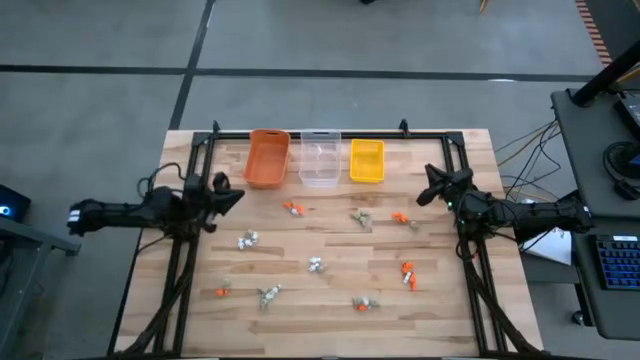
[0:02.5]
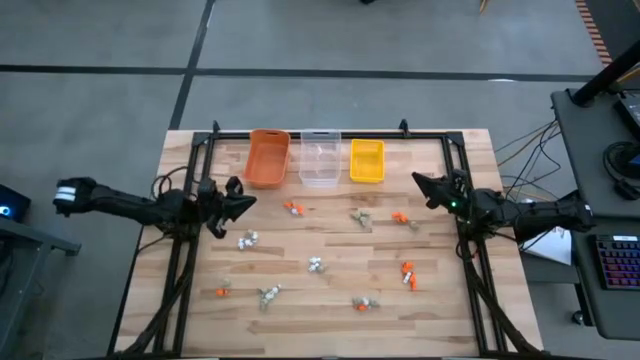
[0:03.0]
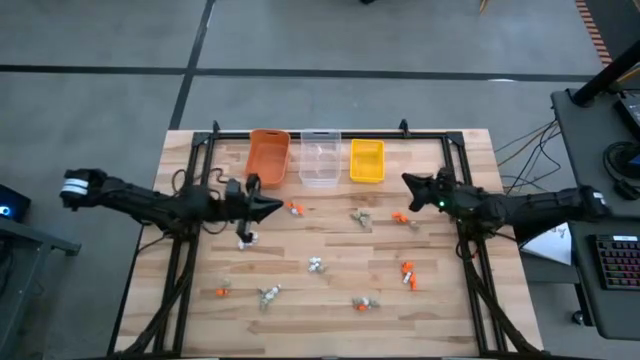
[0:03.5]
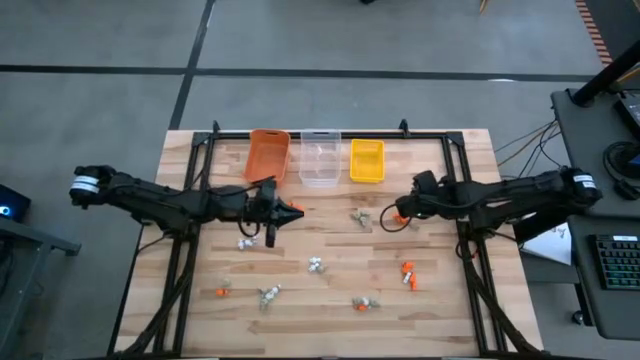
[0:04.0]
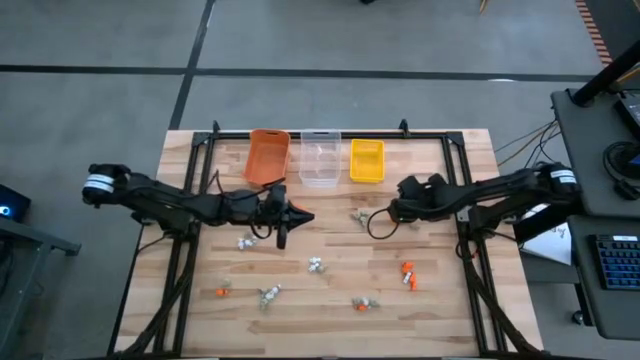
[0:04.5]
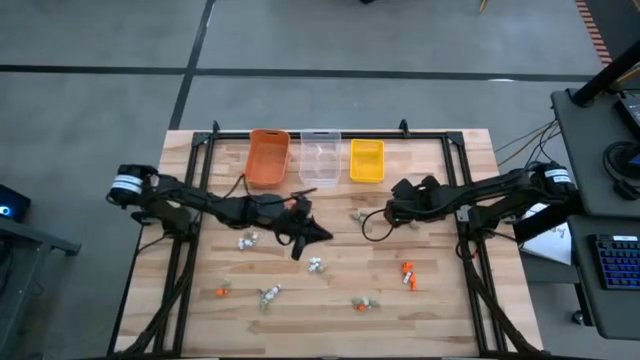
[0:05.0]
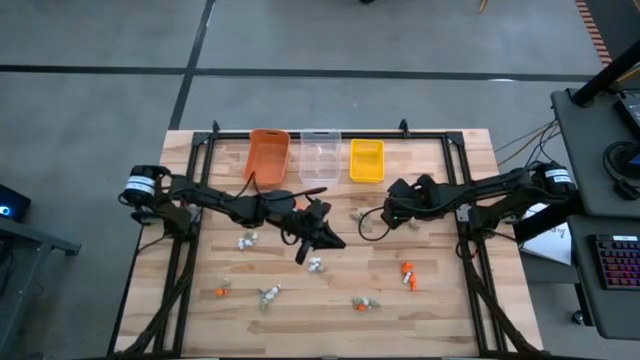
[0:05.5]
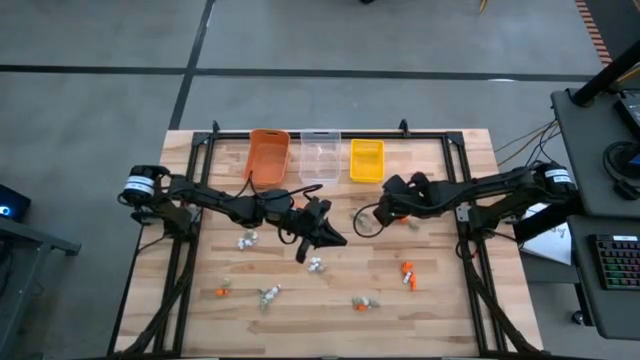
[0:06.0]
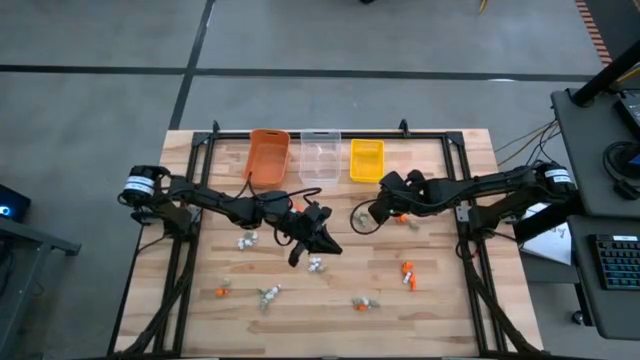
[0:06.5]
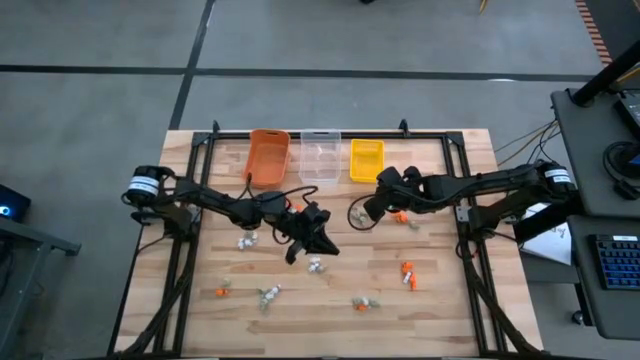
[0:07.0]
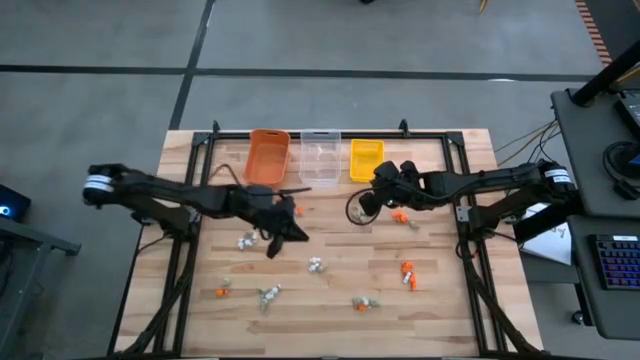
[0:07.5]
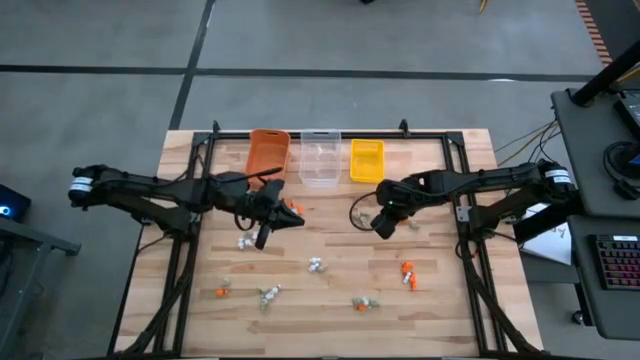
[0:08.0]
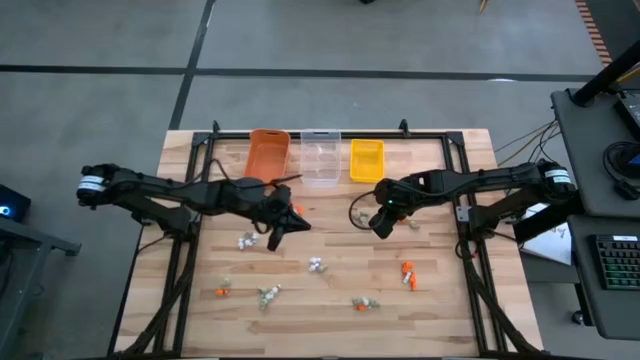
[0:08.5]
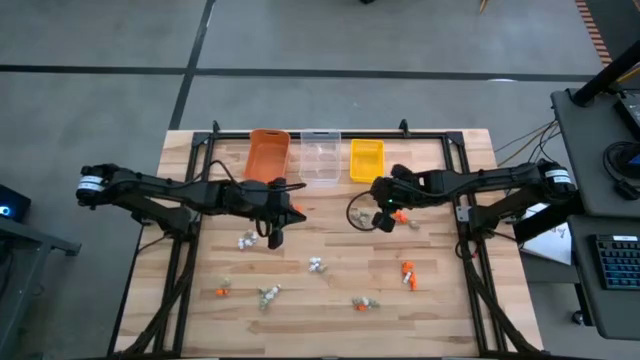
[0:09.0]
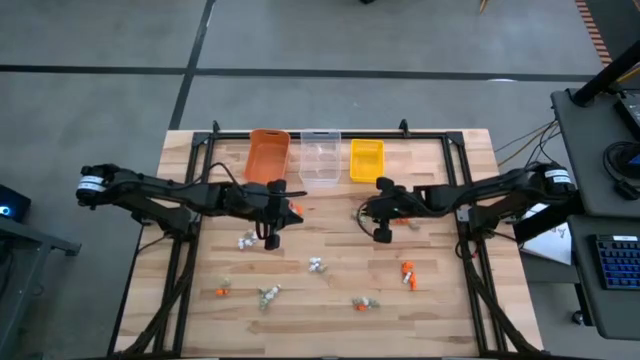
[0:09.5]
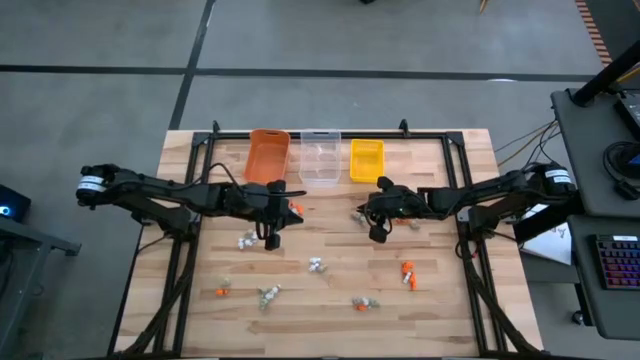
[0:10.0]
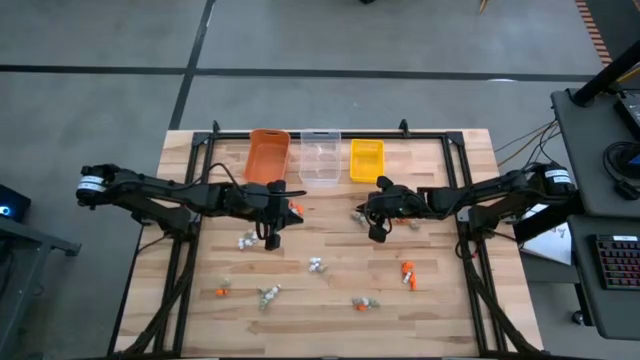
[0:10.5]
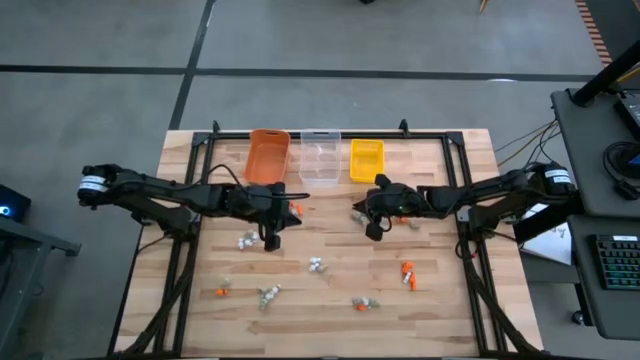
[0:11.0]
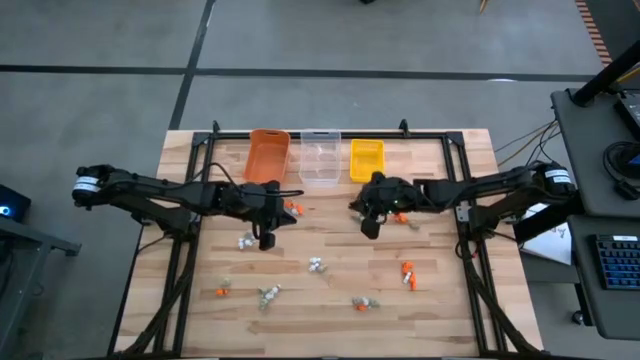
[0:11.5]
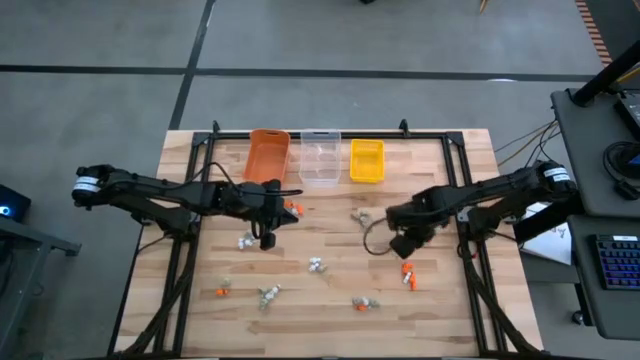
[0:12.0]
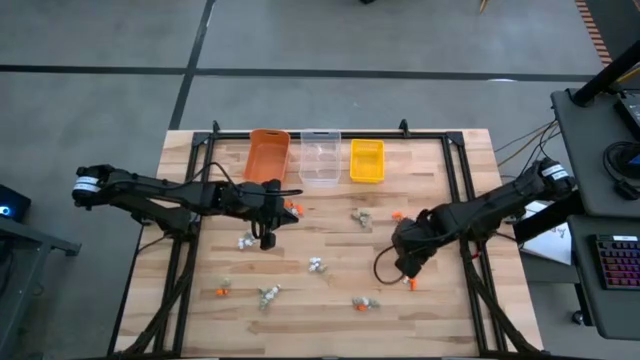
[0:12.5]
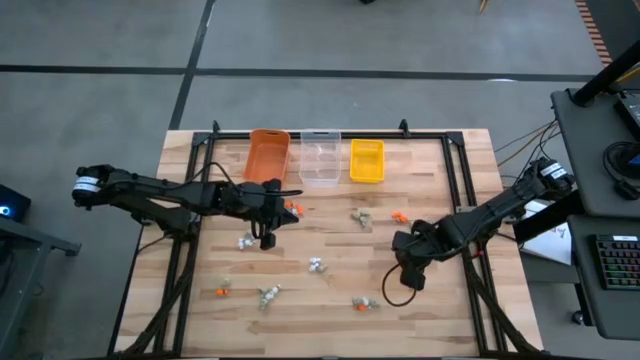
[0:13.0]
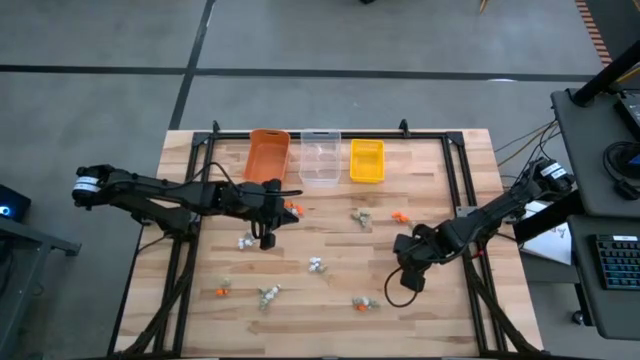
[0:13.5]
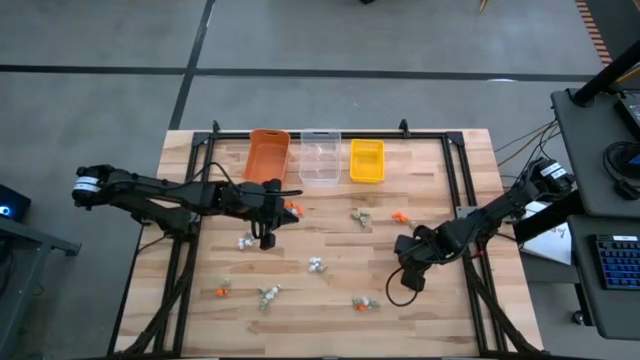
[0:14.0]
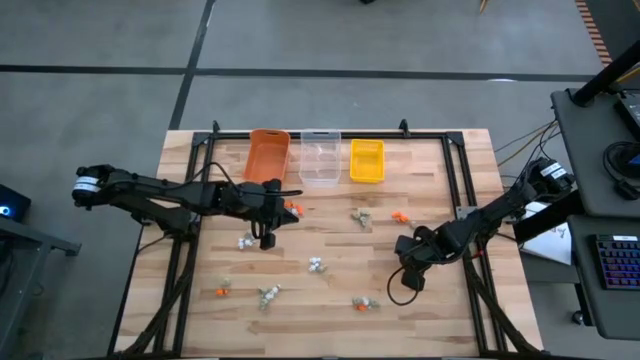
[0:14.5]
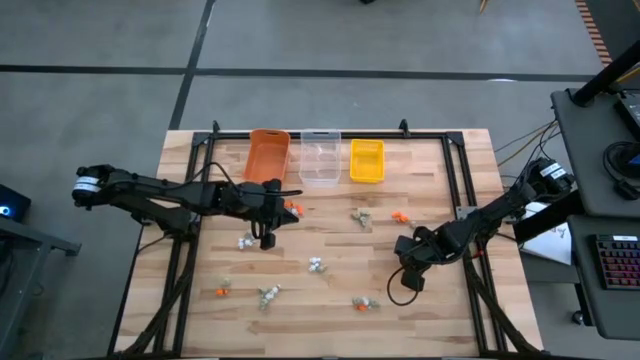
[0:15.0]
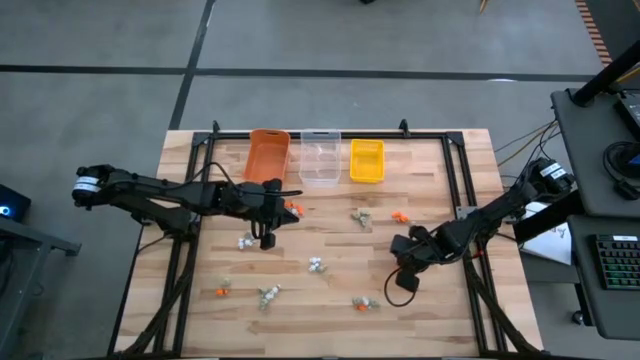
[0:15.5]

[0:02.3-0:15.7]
Task: Sort Halloween decoration
Put the orange skeleton toy into the yellow bin

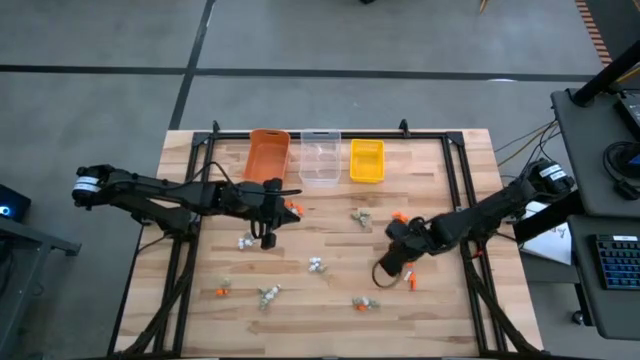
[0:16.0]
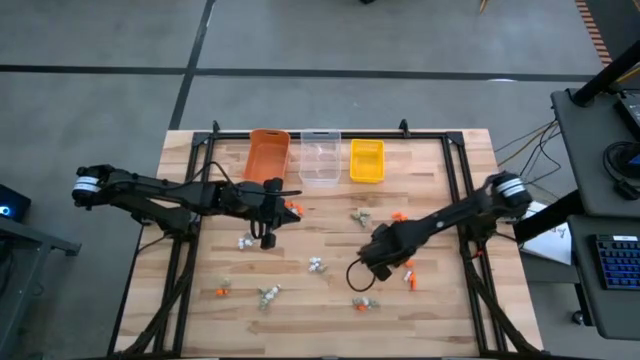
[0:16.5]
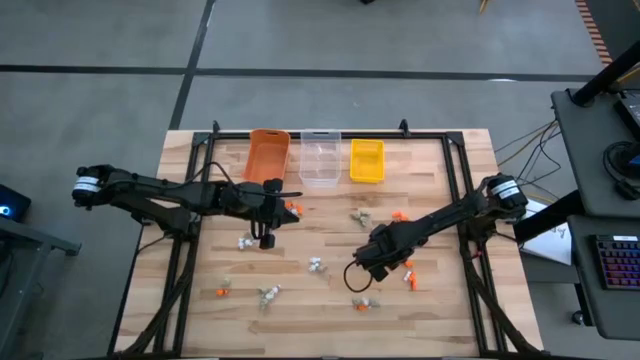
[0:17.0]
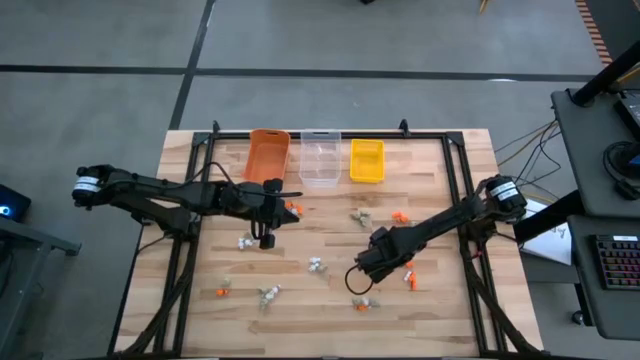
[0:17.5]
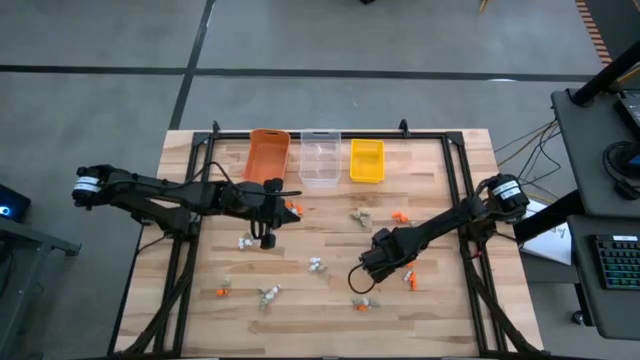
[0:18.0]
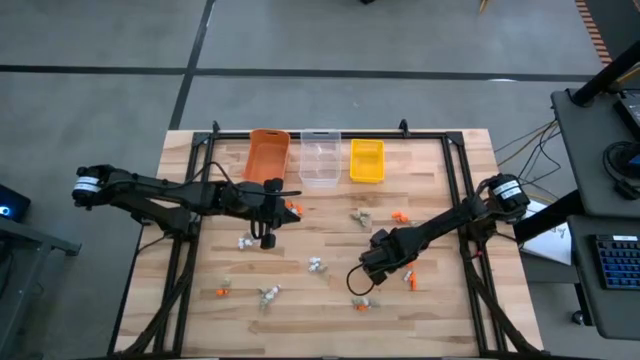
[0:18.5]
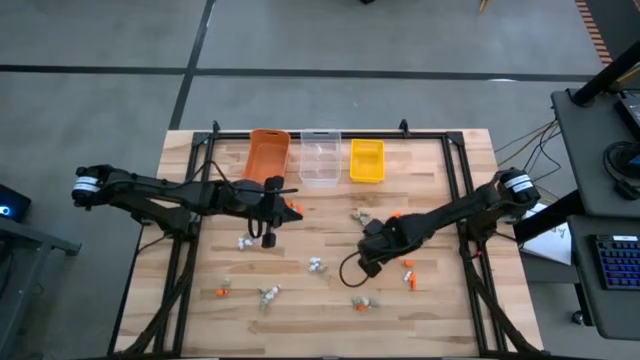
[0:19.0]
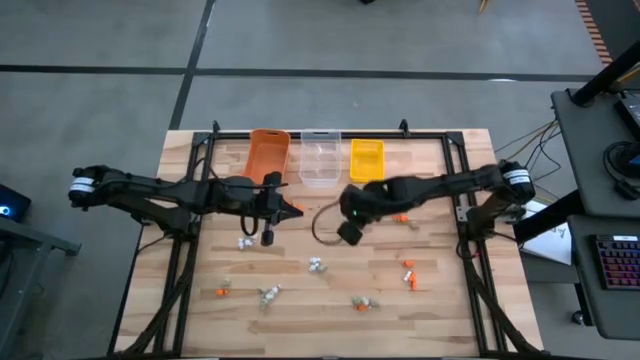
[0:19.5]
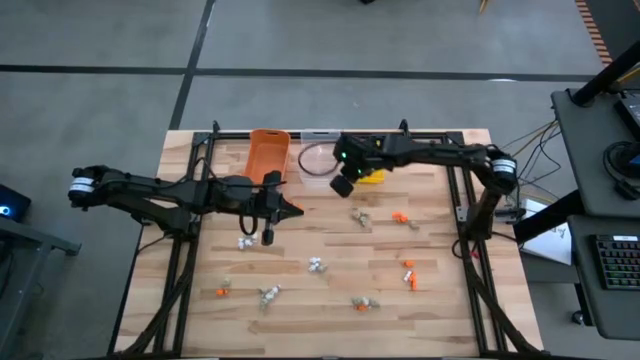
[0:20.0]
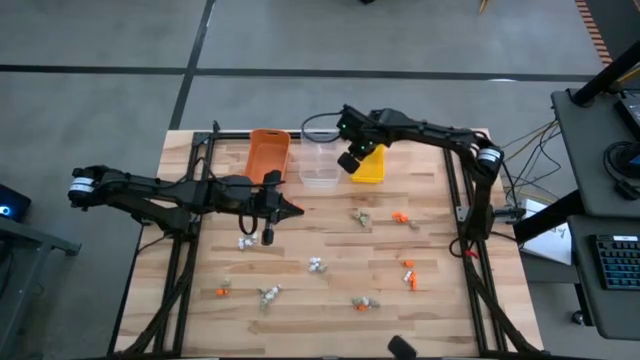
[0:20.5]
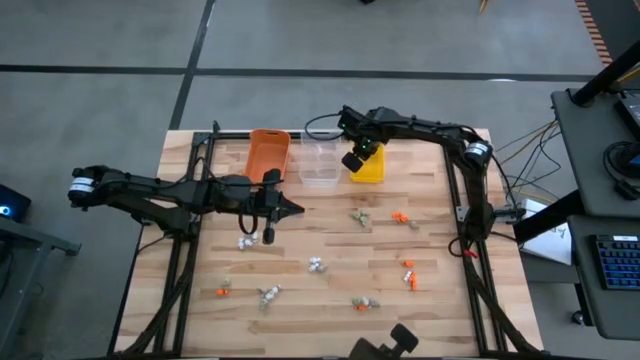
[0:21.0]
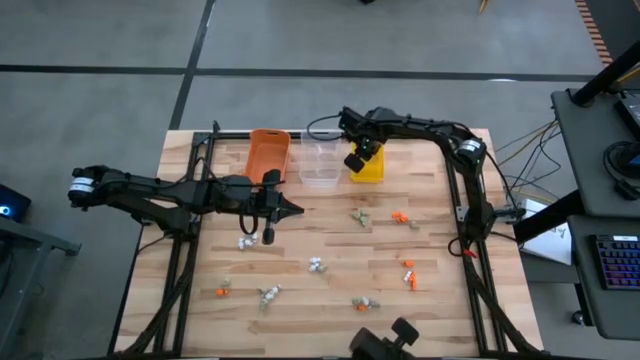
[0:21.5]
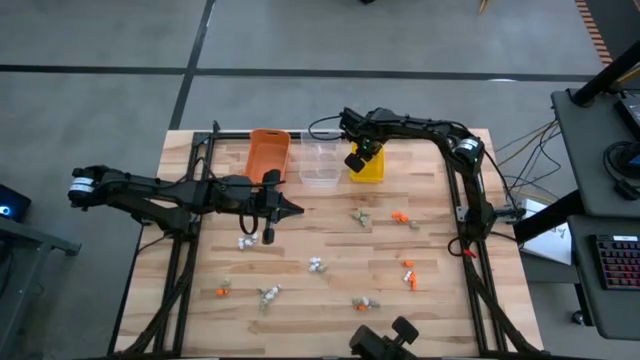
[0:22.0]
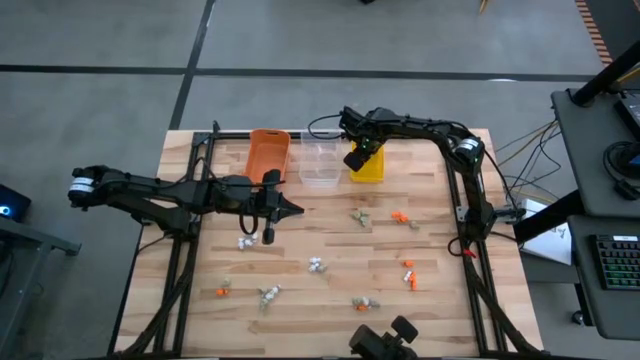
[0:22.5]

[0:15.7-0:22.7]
Put the orange skeleton toy into the yellow bin
